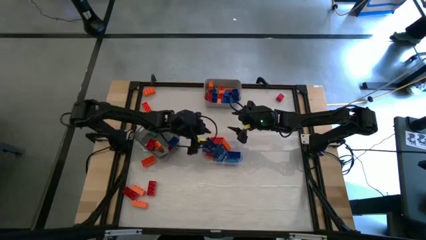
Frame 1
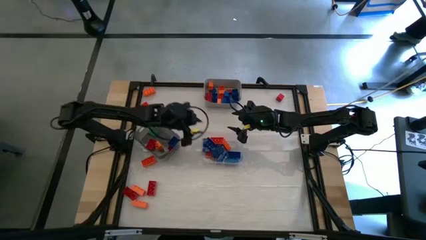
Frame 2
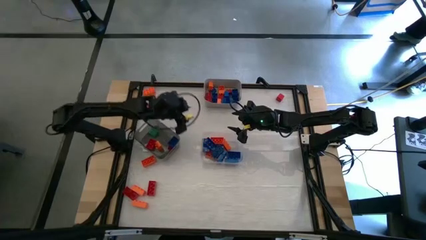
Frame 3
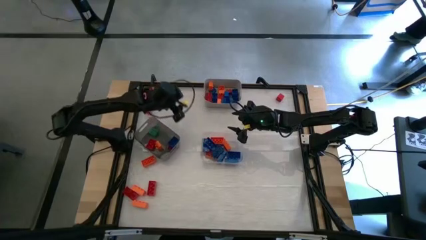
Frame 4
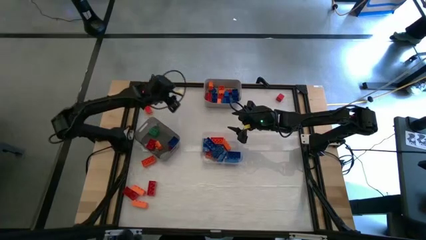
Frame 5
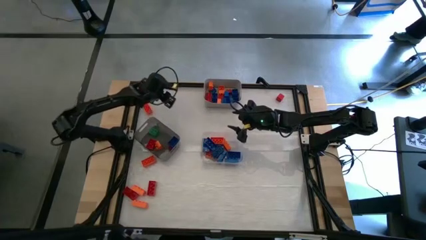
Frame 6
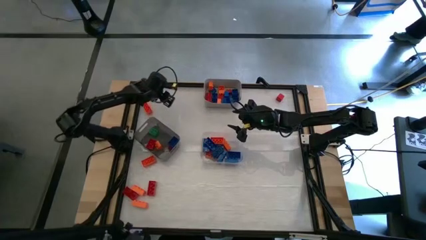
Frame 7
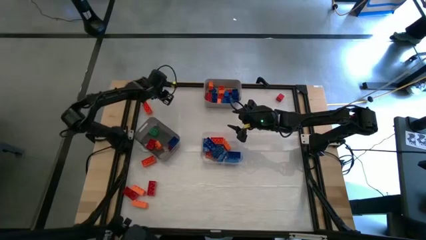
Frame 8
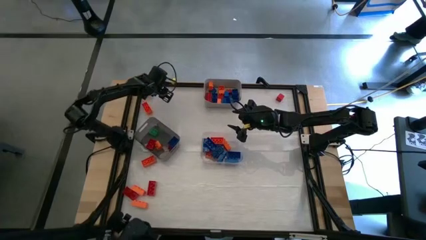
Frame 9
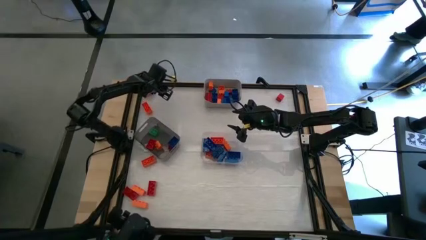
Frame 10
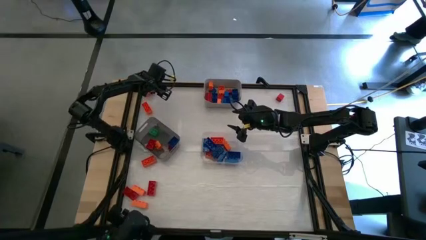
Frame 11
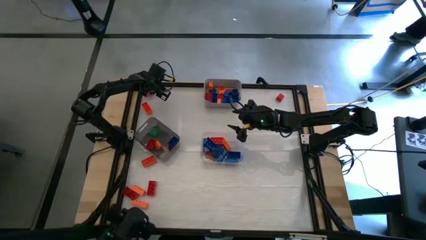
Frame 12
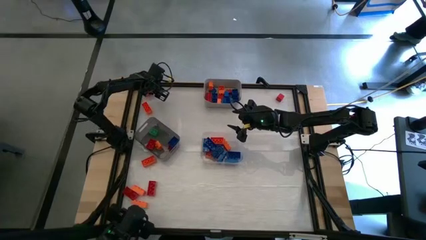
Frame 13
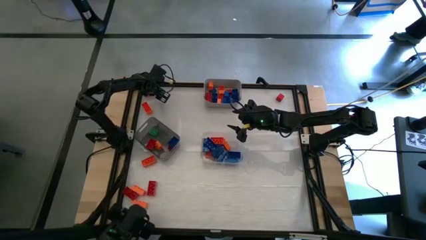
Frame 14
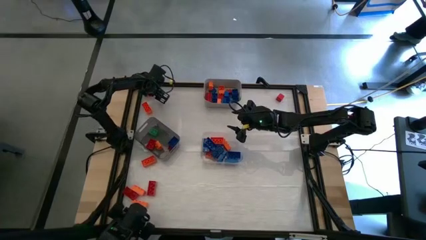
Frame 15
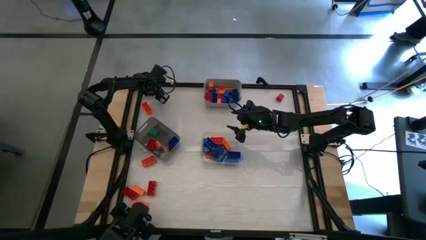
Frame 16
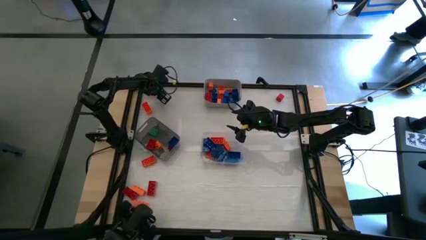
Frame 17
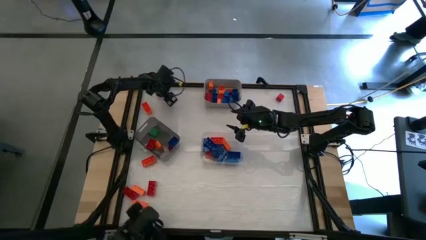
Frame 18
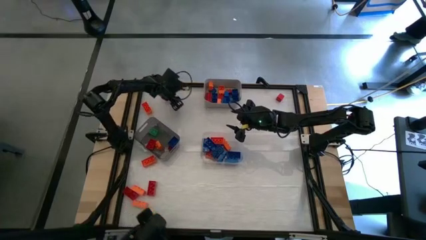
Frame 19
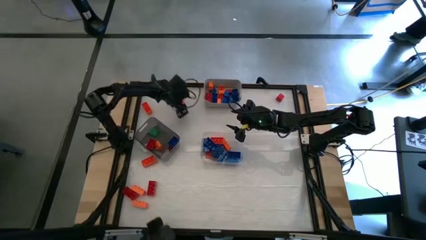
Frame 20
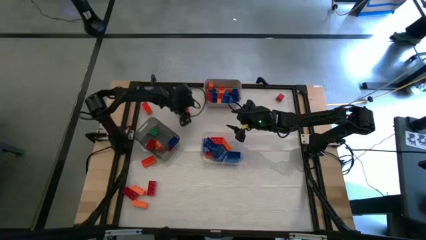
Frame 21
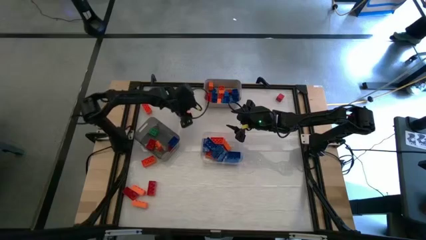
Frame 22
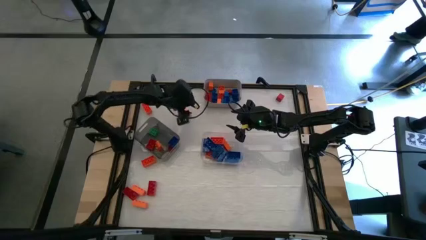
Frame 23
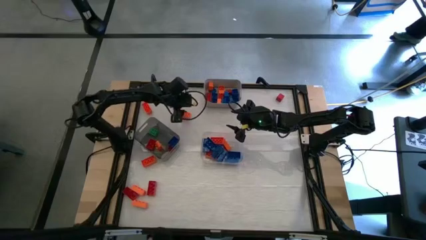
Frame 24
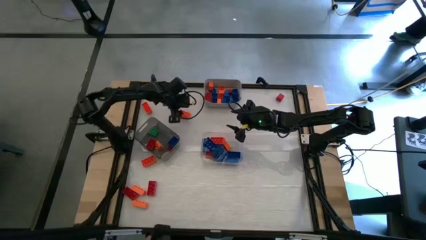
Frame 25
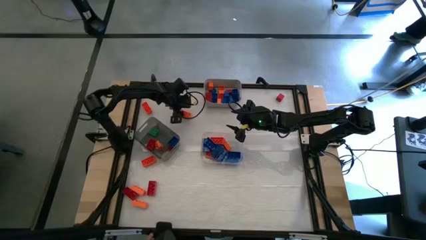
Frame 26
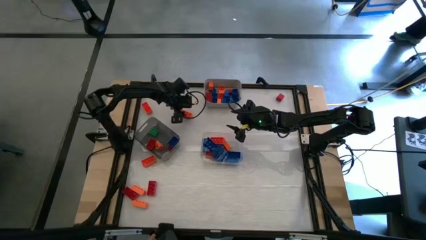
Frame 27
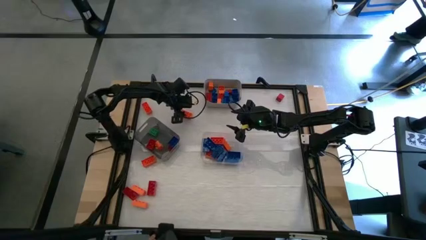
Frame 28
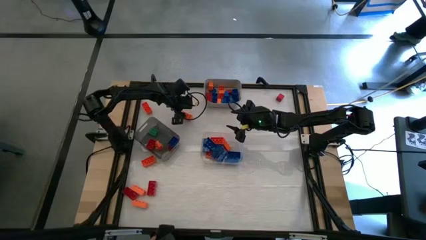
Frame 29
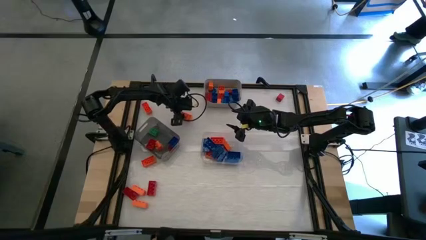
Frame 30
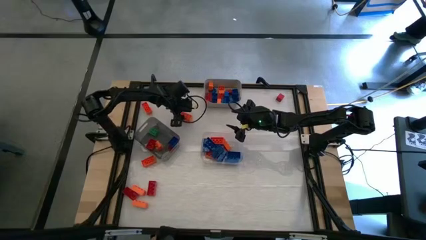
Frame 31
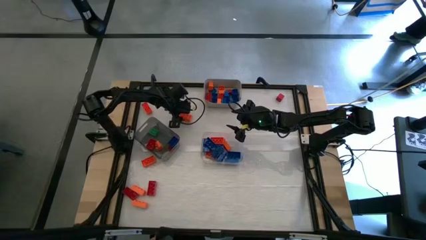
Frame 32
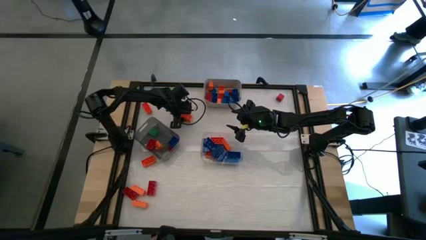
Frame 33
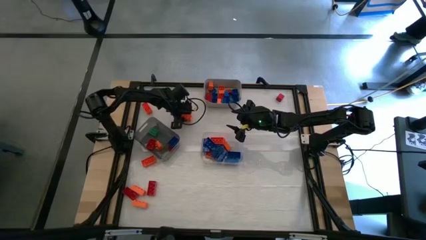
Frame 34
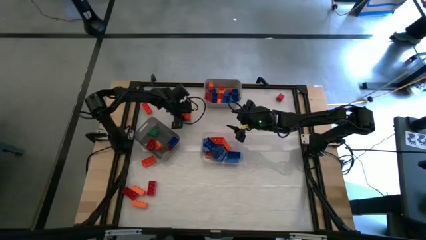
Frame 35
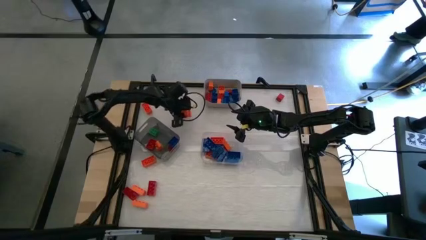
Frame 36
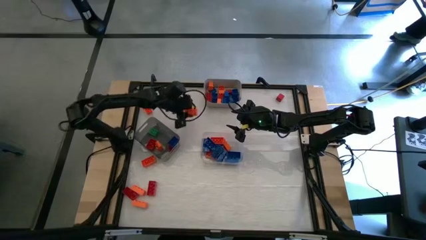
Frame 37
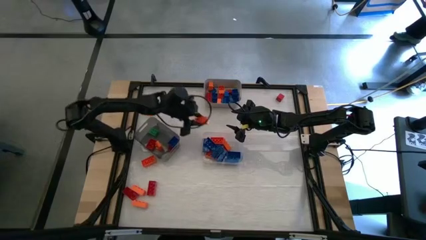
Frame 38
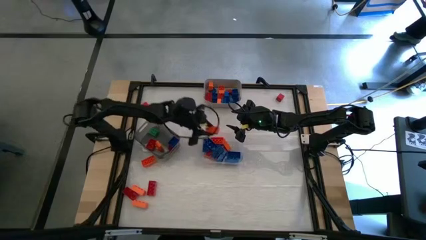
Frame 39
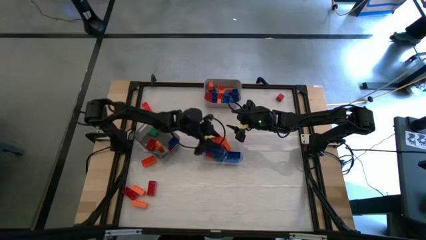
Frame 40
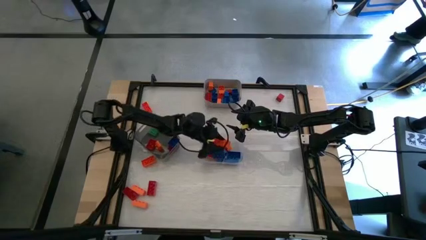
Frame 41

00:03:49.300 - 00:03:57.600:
Task: Sort blocks by size
Put the big orange game piece into the transparent bin

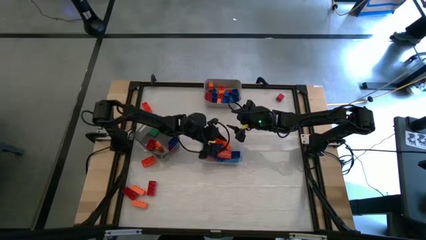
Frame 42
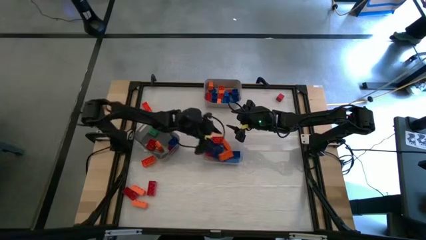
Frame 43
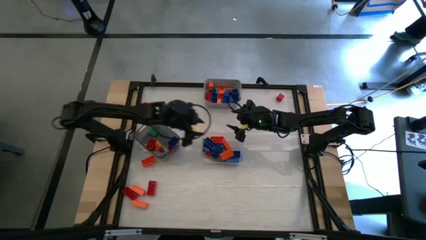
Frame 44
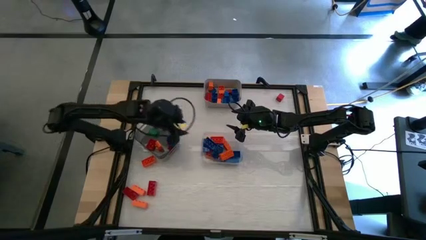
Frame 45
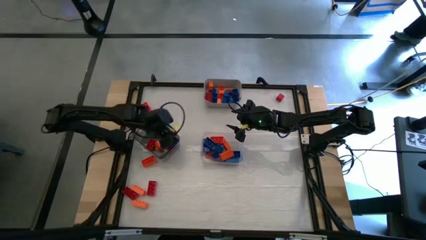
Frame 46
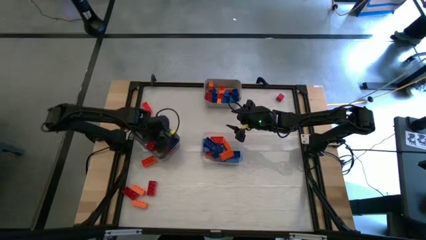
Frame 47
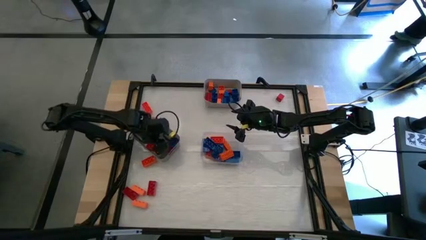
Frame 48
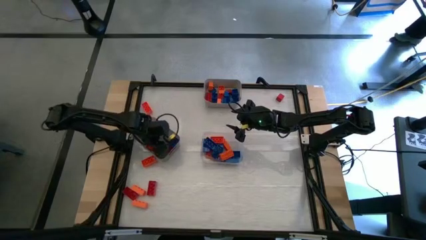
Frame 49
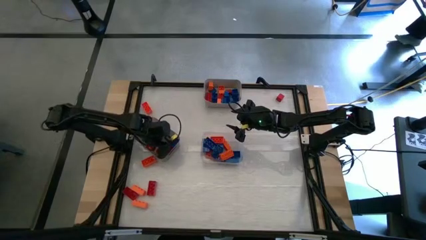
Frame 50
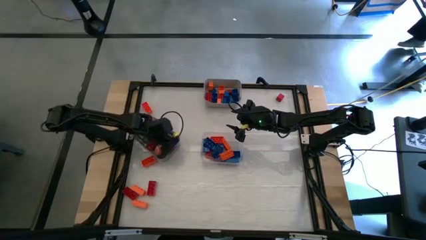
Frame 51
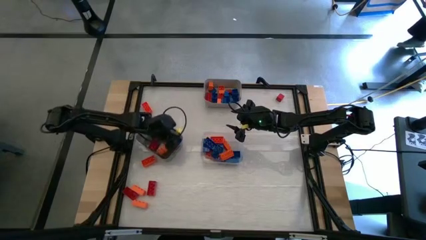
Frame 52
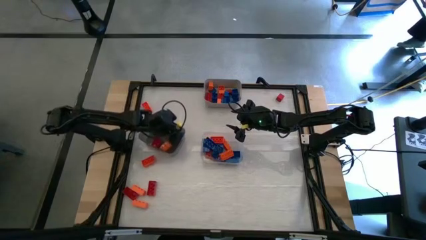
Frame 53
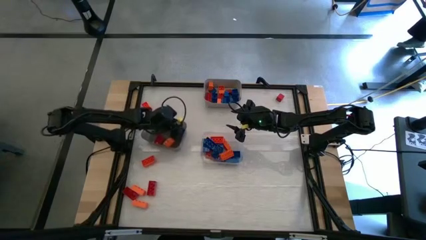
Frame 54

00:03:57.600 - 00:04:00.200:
Adjust the black bin

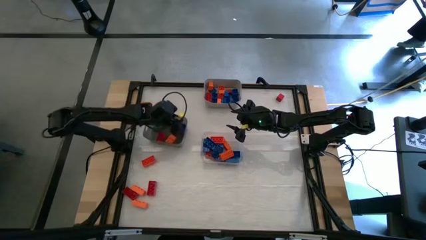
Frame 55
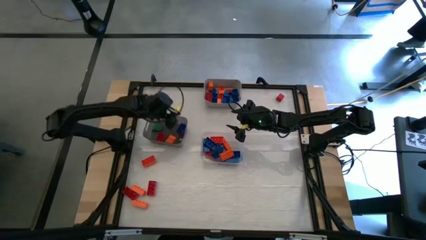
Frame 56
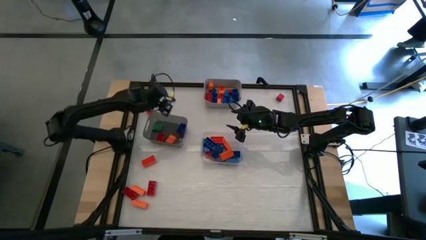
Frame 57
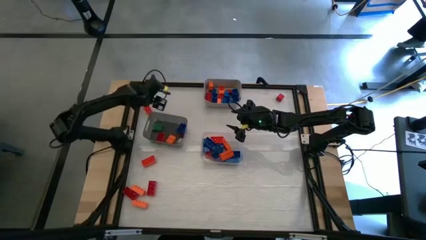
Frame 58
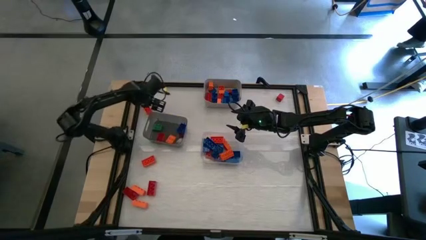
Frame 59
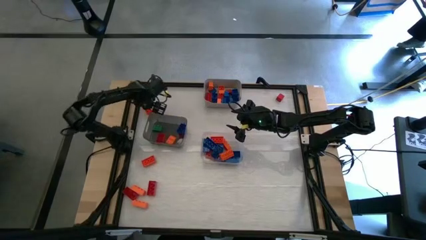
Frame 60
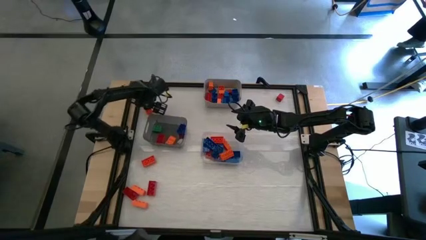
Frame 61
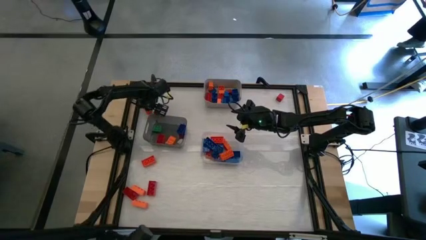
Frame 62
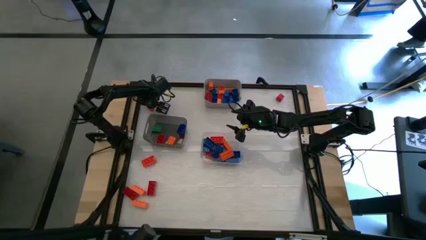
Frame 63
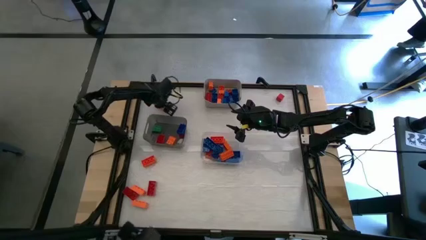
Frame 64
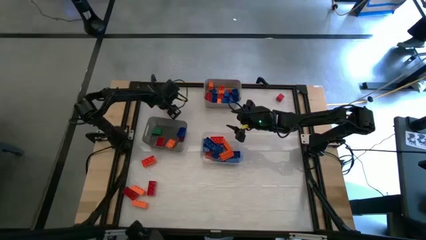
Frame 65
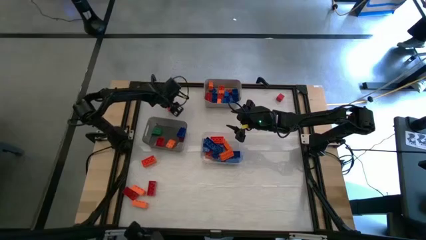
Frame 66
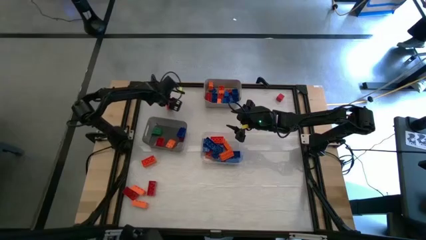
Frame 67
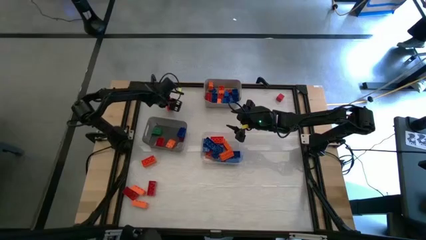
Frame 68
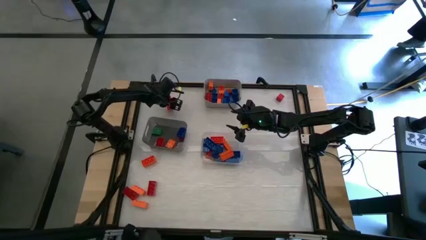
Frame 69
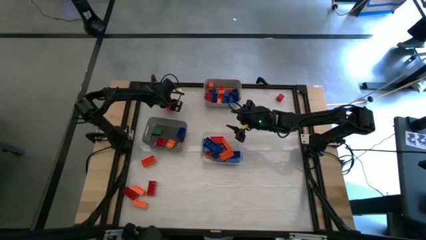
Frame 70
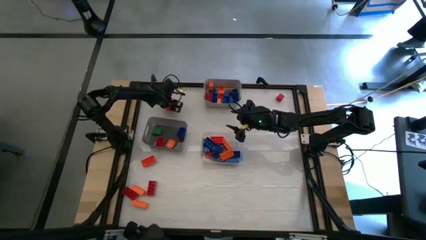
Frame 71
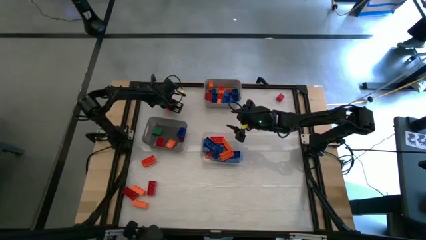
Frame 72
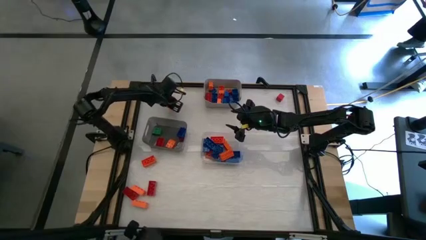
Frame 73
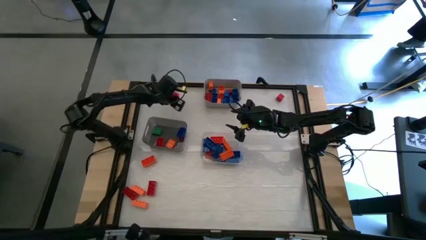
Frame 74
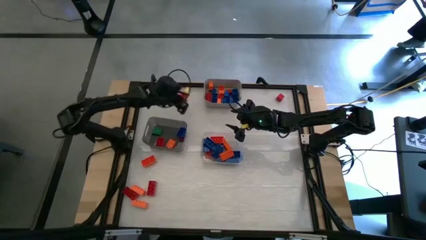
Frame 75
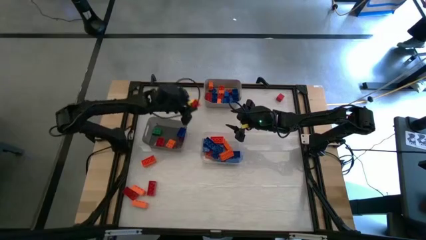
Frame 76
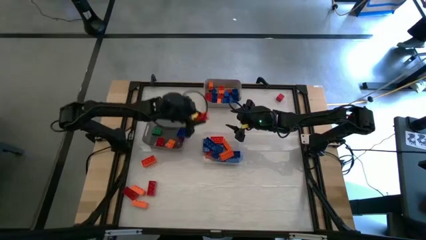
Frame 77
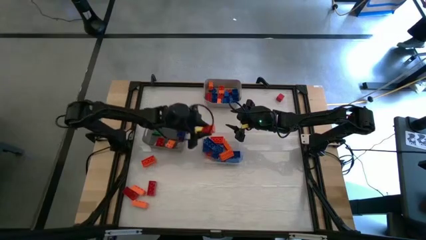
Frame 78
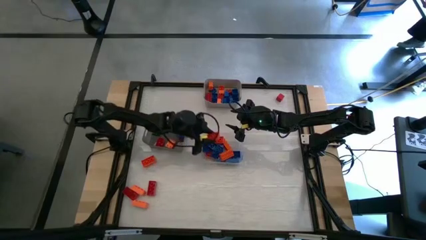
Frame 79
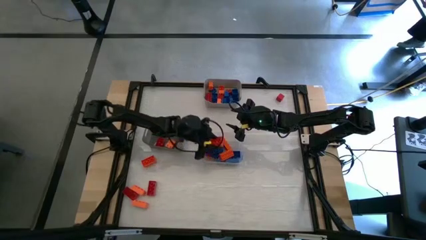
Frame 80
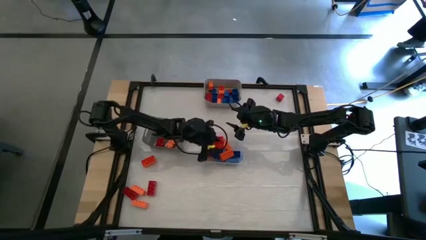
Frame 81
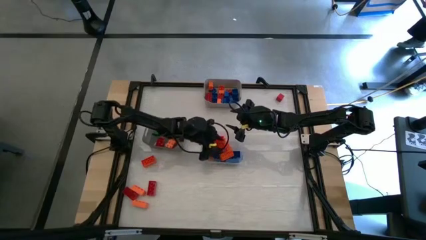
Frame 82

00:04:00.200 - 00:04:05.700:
Put the big orange game piece into the transparent bin
